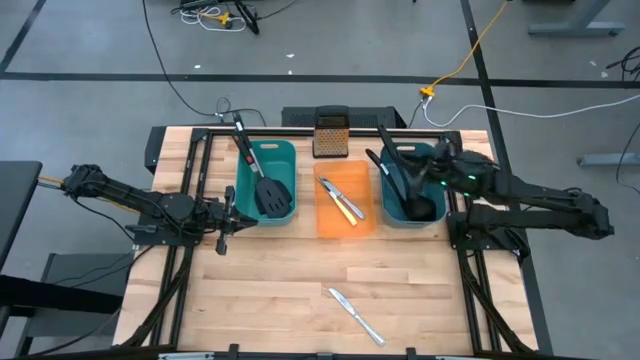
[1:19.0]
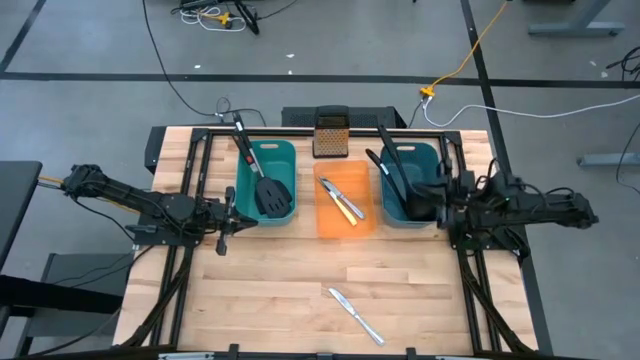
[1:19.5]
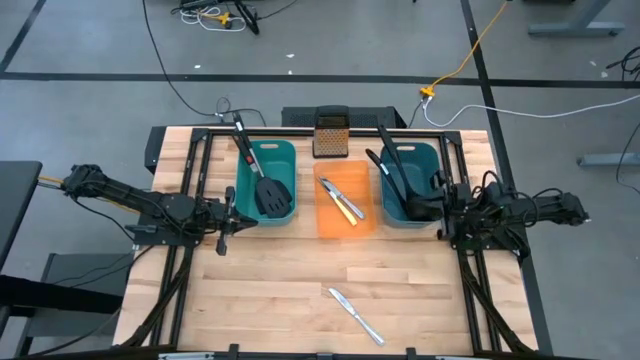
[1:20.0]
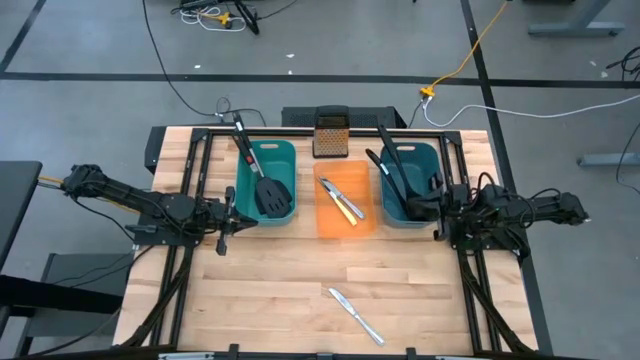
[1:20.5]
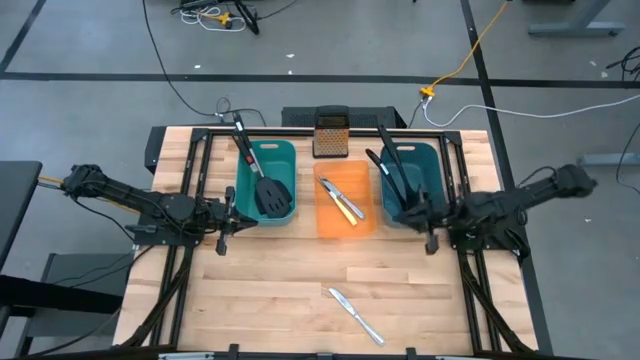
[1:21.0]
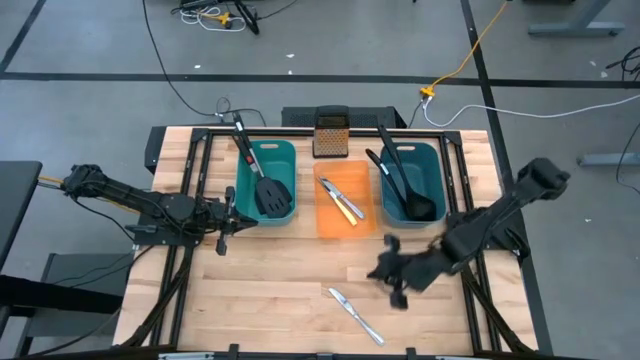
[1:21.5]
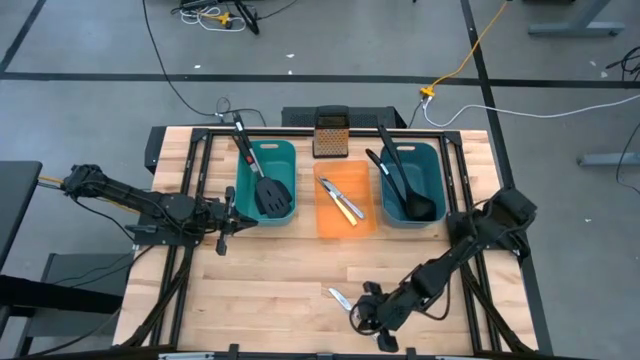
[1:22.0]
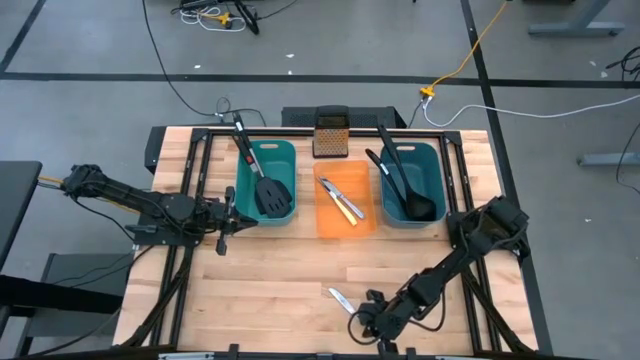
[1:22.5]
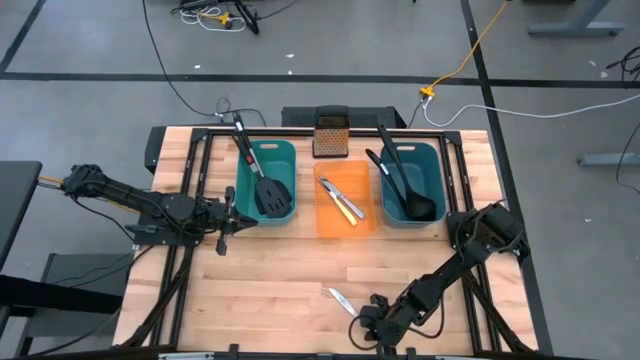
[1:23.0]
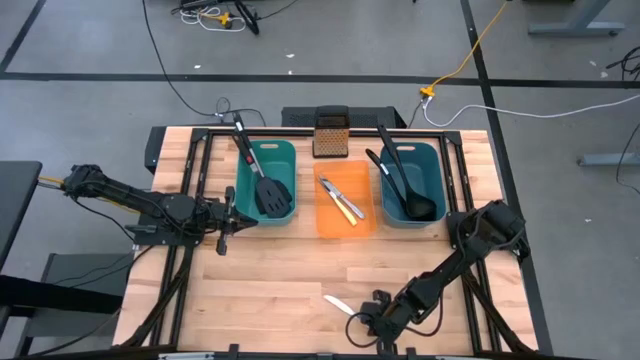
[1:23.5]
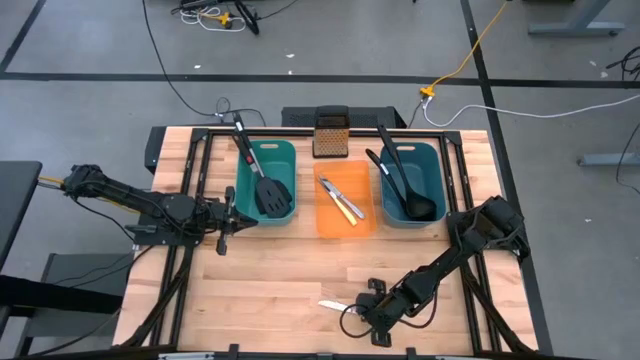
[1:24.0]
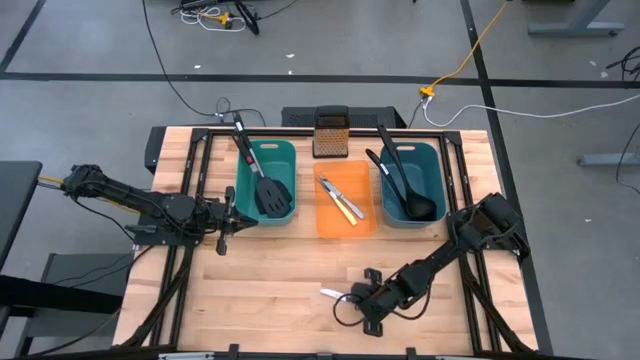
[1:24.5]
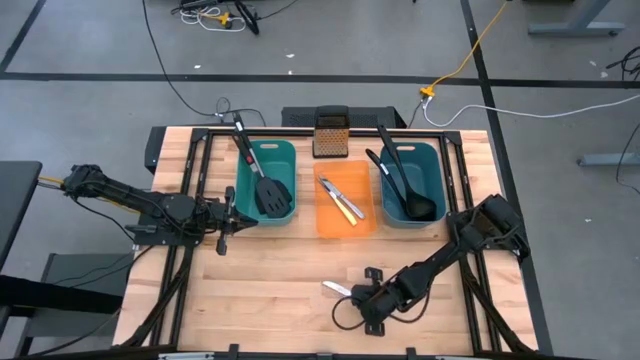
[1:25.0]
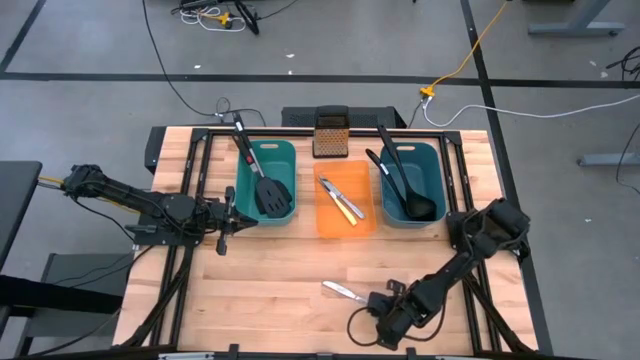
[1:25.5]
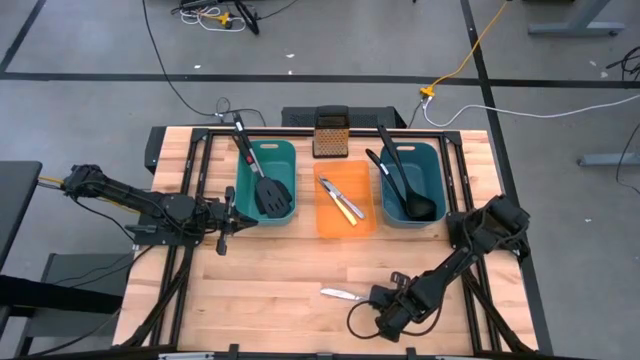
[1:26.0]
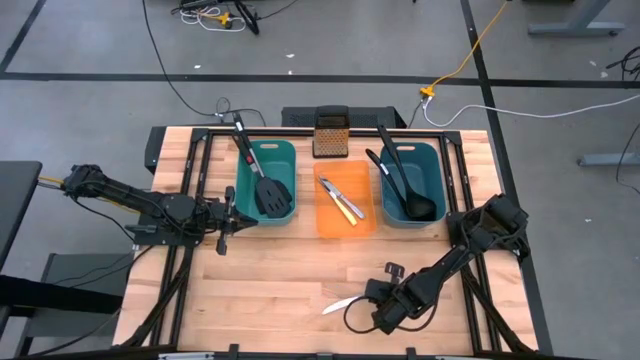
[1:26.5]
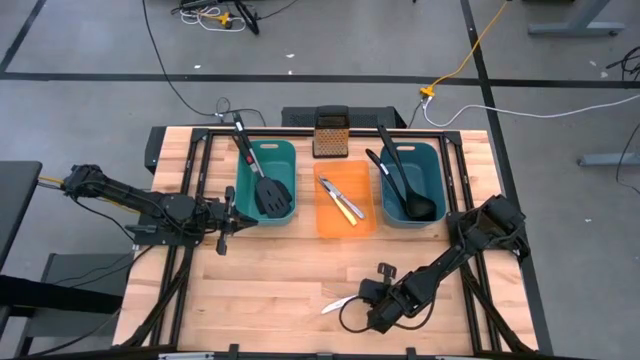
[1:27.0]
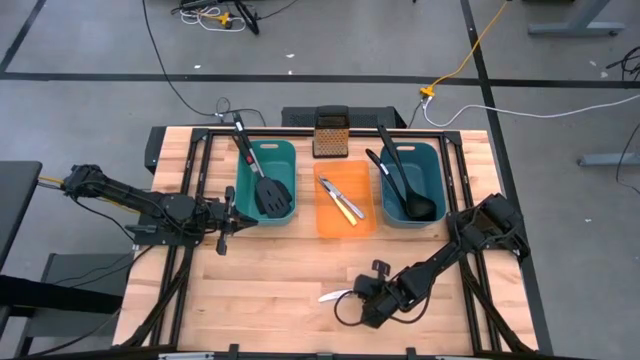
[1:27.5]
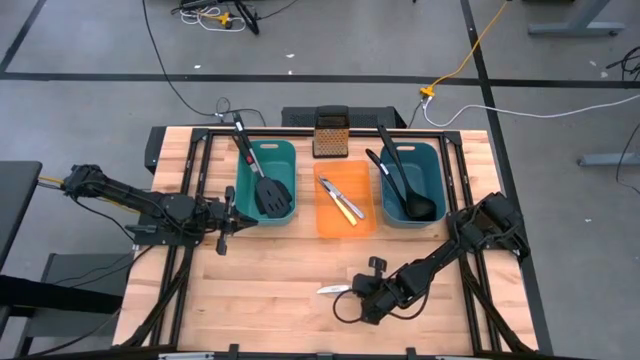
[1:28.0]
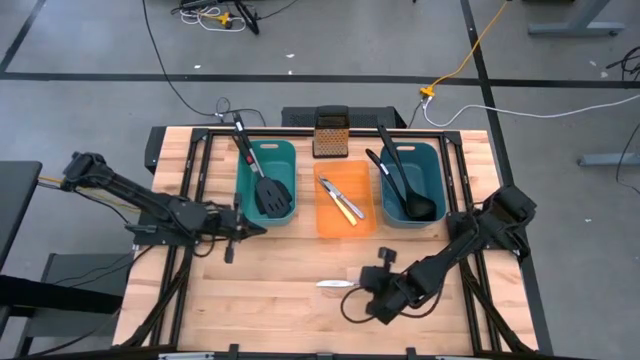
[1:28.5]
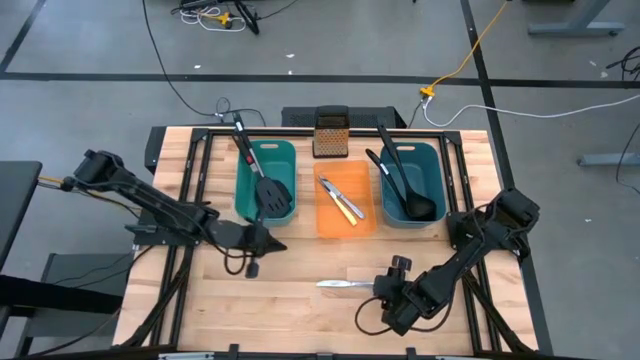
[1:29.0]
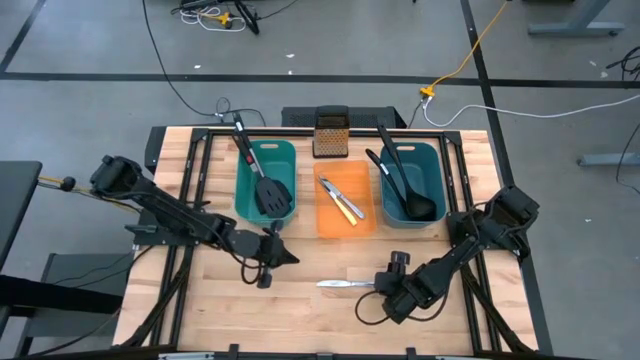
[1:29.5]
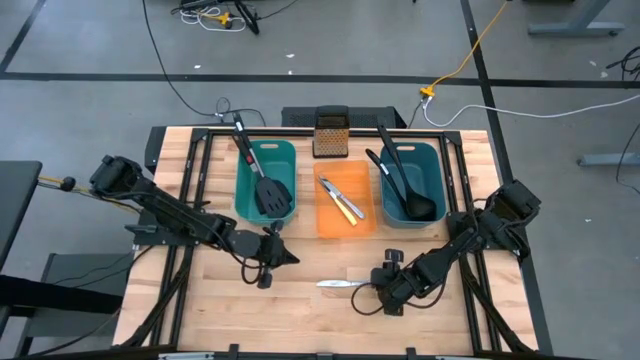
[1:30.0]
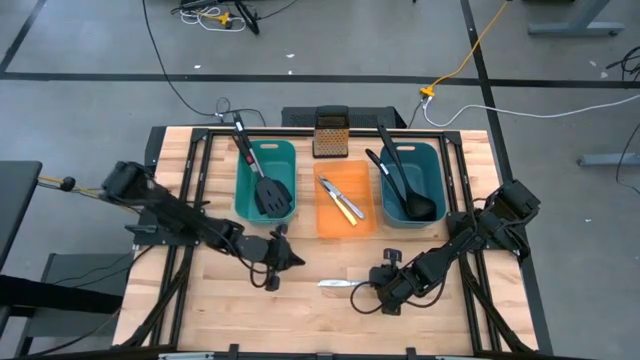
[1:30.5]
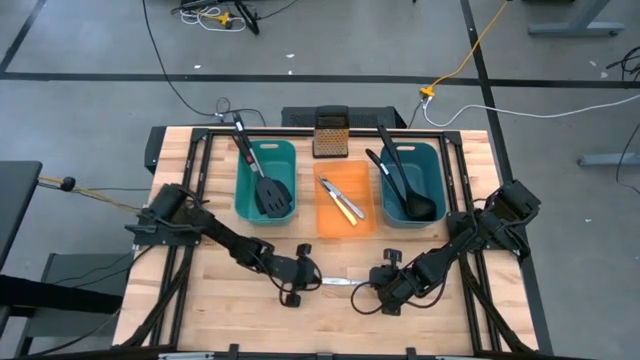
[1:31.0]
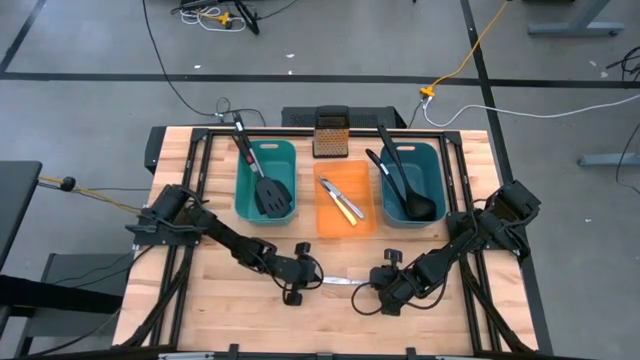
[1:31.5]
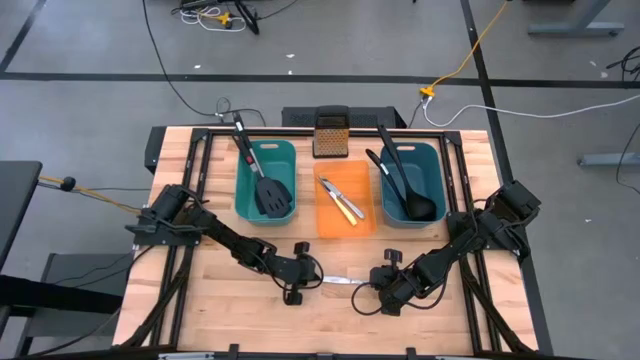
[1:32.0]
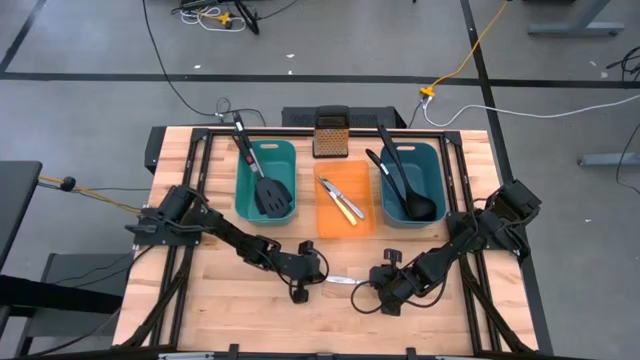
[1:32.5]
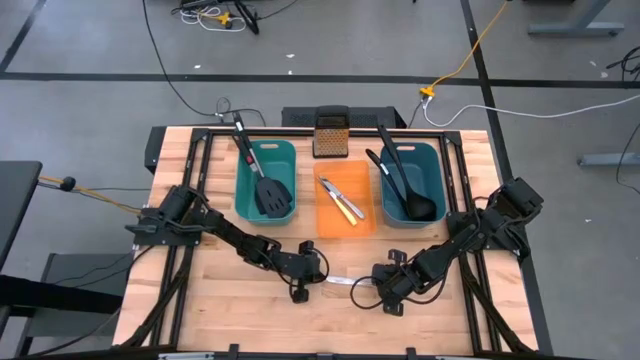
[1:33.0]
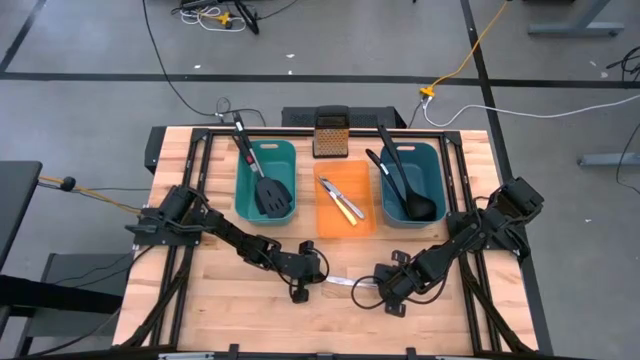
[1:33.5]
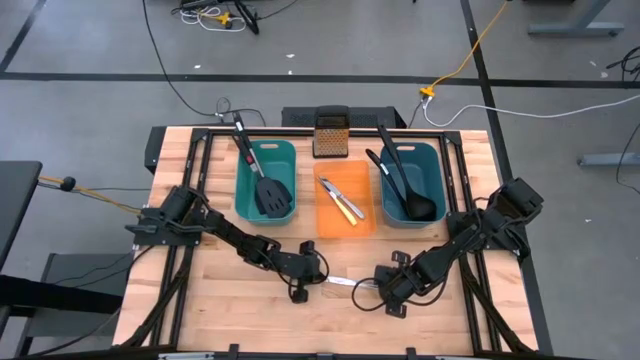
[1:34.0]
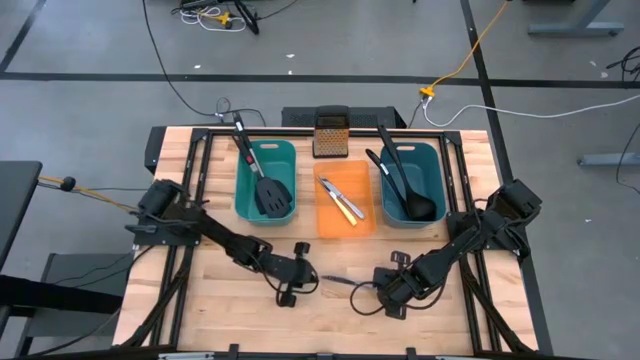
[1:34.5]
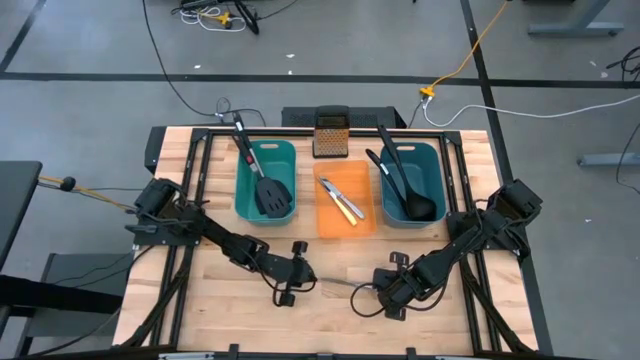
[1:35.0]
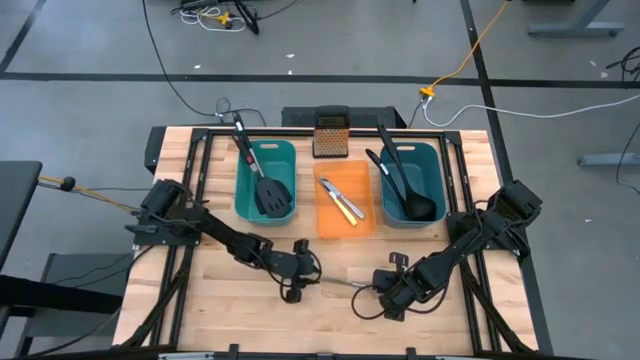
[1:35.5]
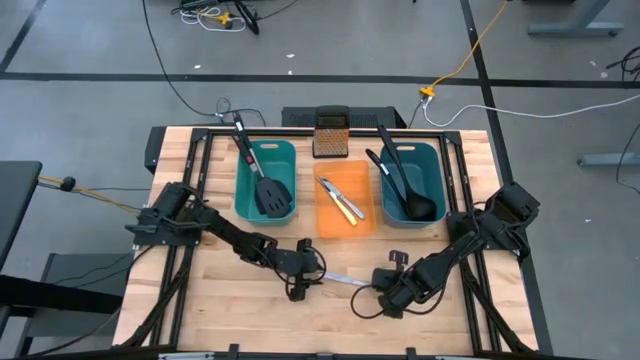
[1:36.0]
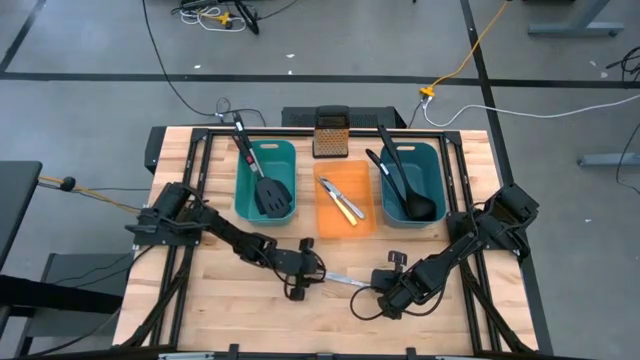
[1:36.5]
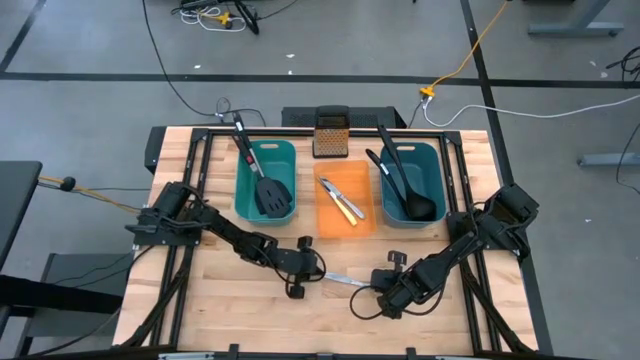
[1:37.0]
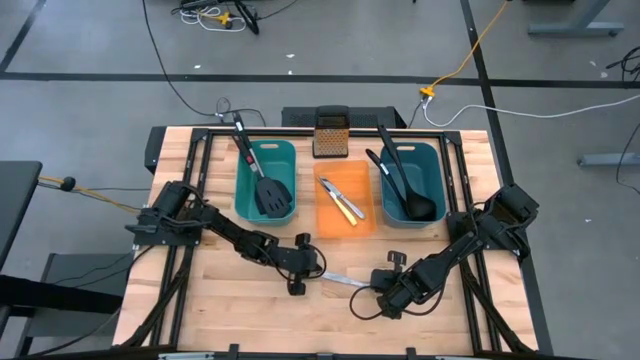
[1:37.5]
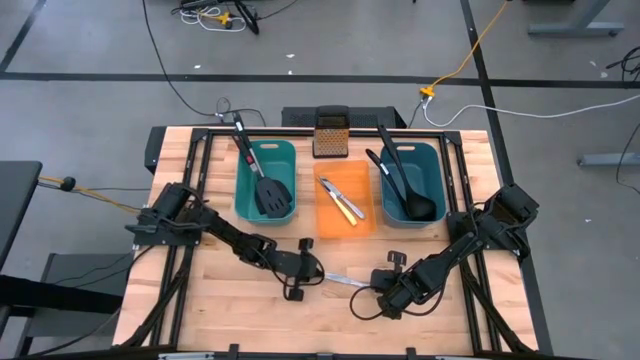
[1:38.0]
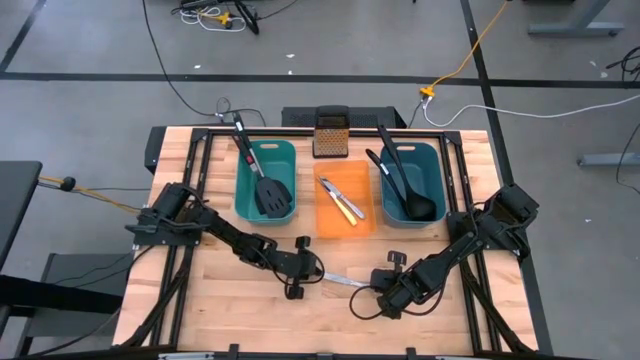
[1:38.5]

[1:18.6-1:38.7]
Task: Pick & Place Kitchen Items
Put the silver table knife into the orange bin
